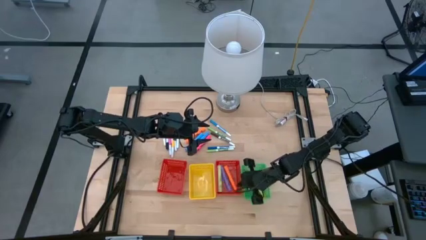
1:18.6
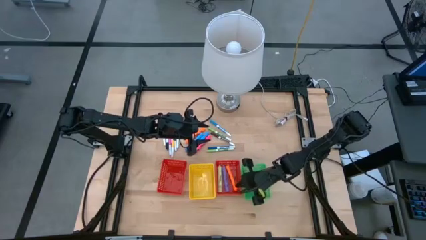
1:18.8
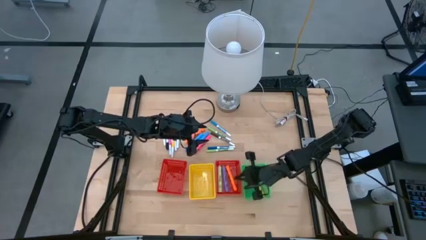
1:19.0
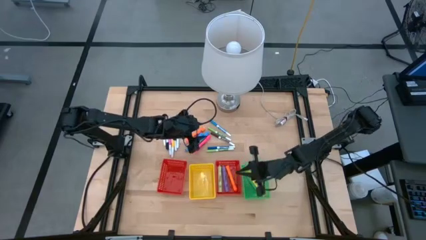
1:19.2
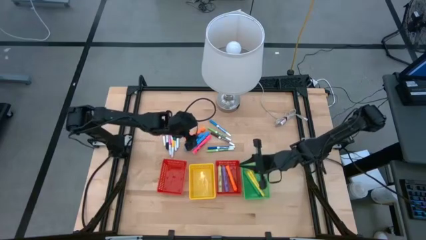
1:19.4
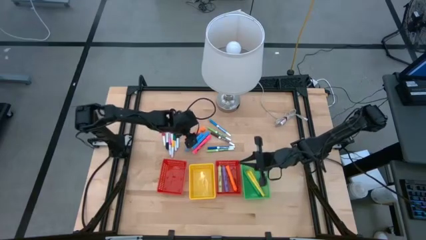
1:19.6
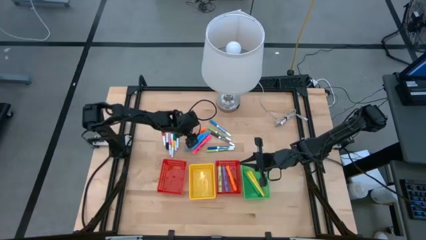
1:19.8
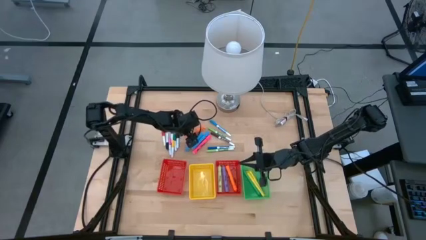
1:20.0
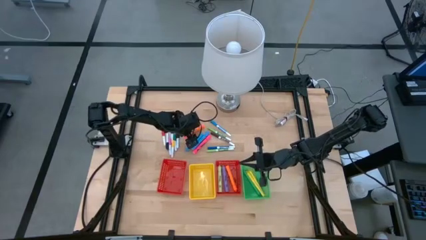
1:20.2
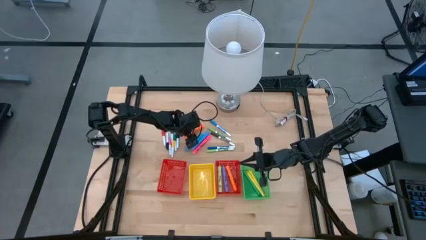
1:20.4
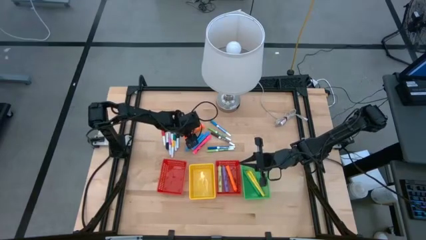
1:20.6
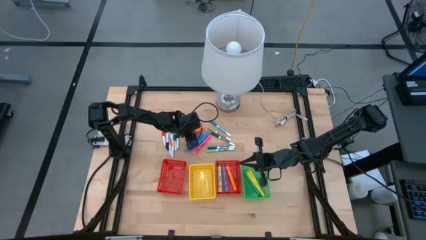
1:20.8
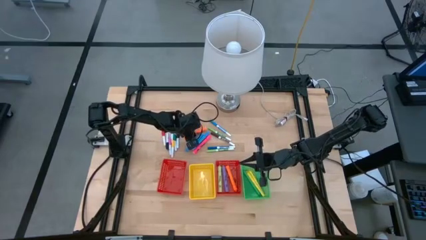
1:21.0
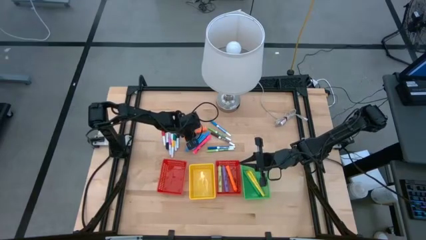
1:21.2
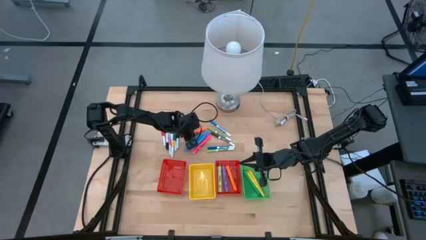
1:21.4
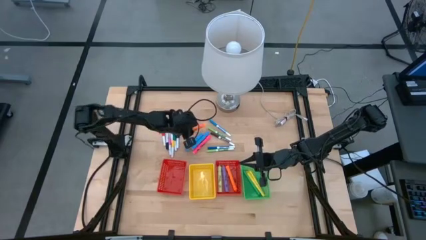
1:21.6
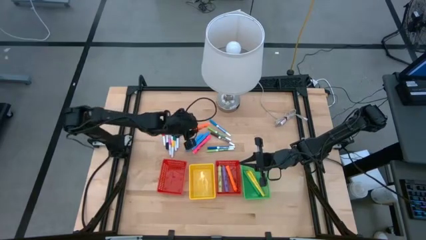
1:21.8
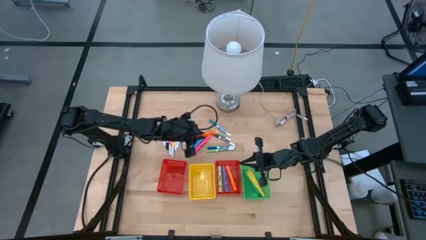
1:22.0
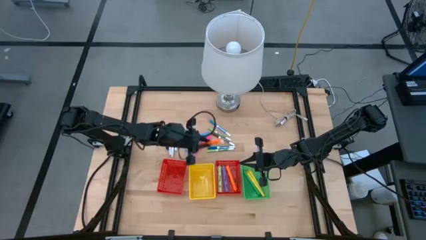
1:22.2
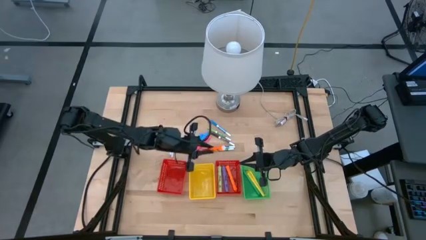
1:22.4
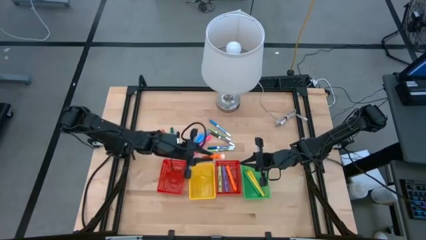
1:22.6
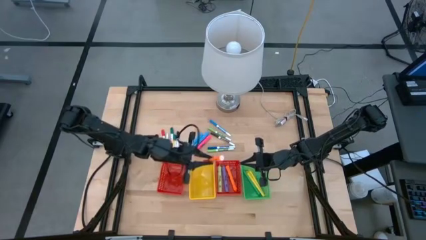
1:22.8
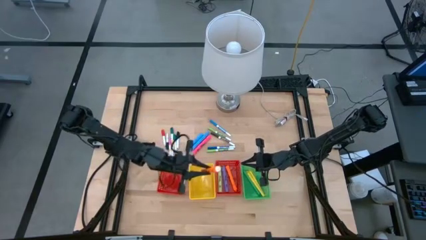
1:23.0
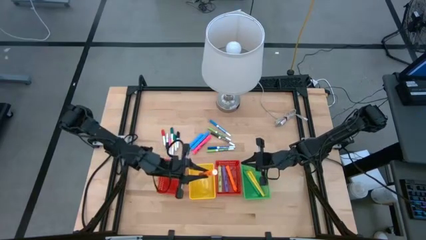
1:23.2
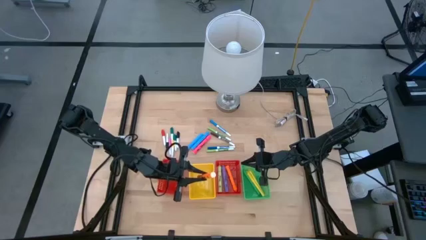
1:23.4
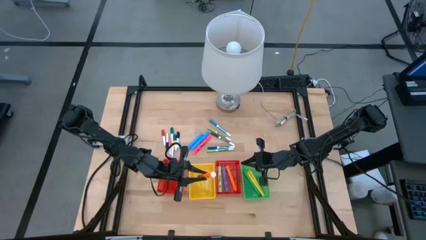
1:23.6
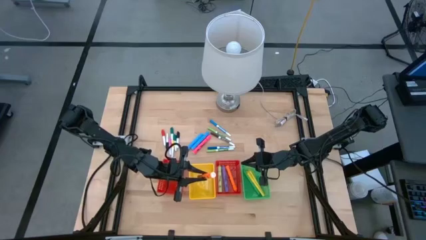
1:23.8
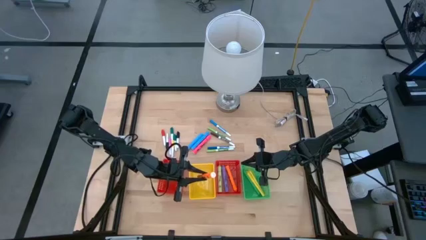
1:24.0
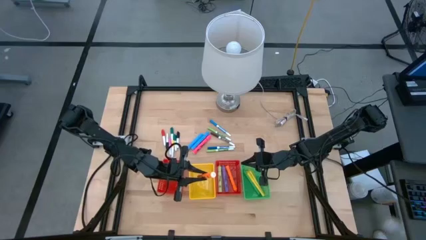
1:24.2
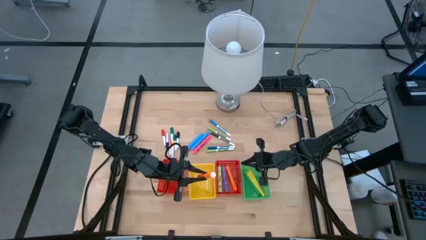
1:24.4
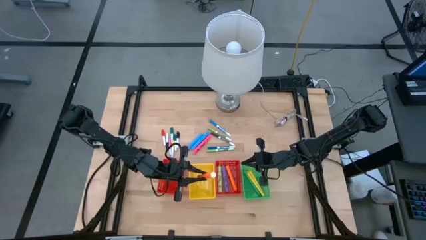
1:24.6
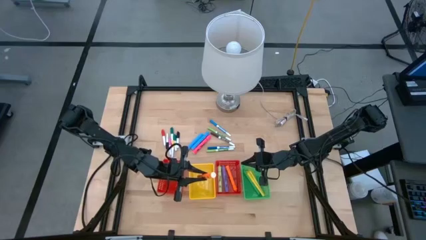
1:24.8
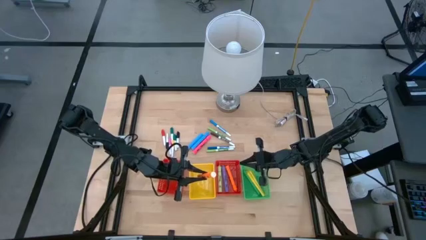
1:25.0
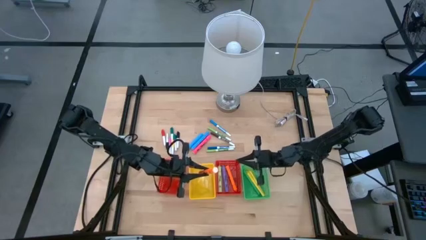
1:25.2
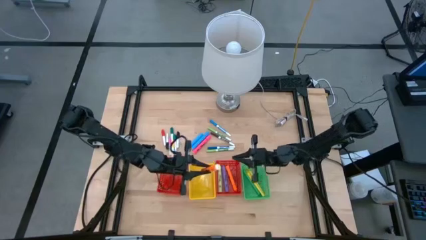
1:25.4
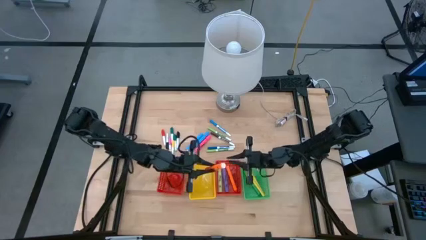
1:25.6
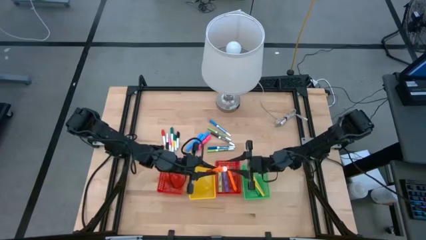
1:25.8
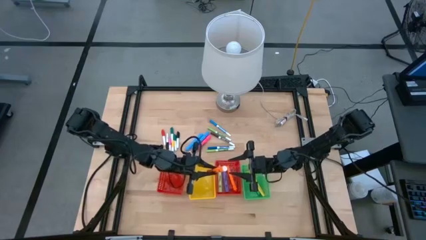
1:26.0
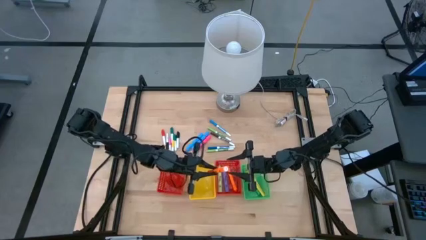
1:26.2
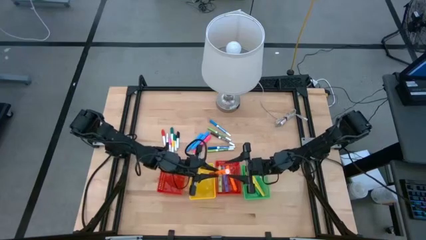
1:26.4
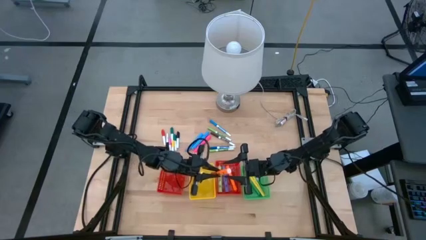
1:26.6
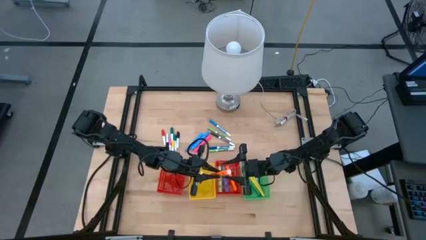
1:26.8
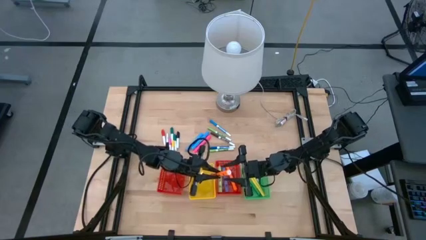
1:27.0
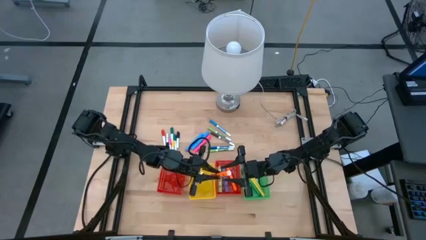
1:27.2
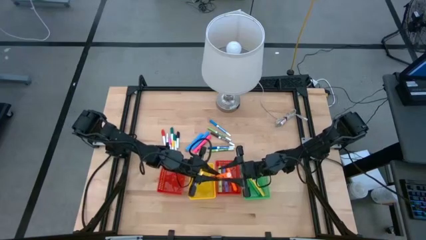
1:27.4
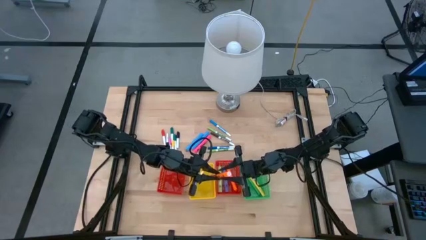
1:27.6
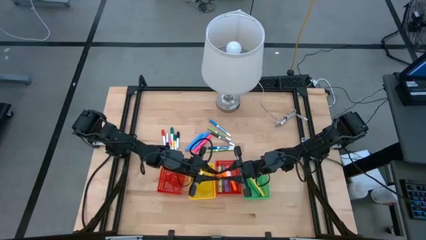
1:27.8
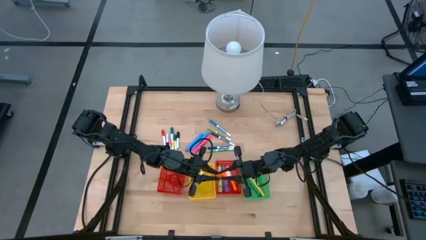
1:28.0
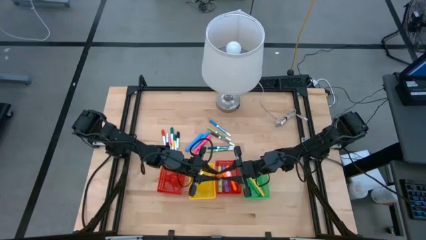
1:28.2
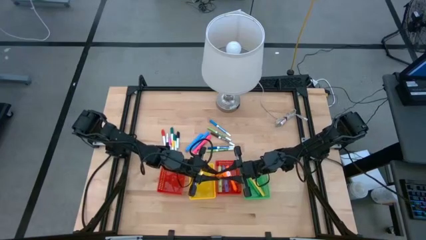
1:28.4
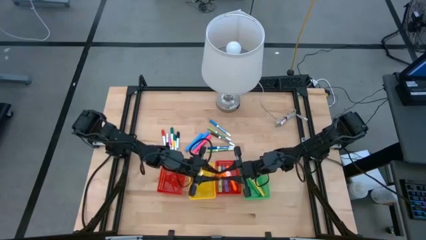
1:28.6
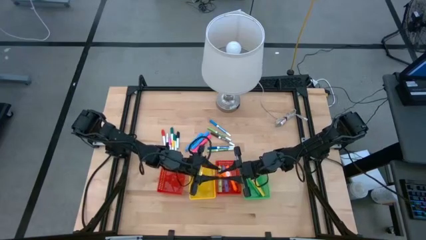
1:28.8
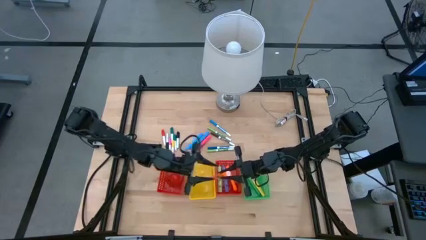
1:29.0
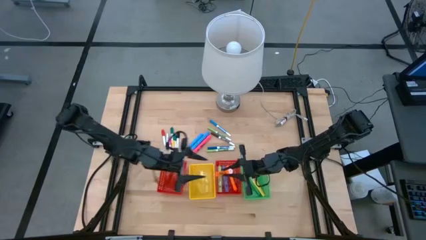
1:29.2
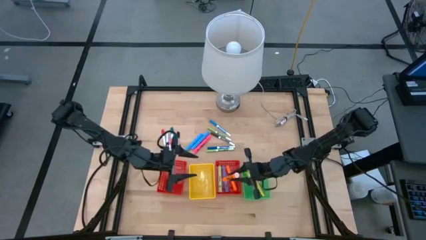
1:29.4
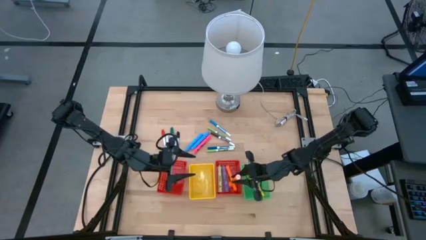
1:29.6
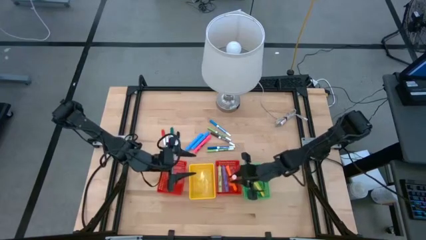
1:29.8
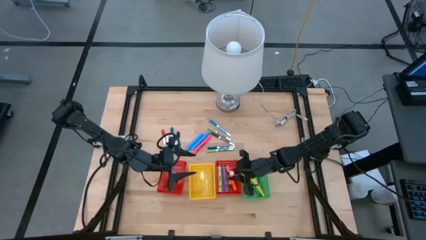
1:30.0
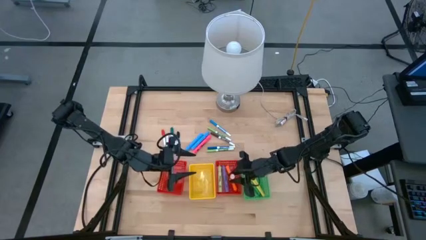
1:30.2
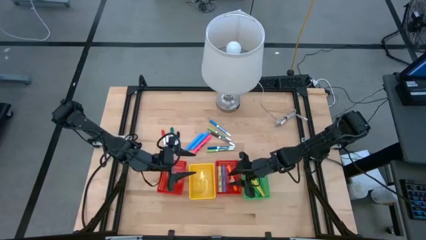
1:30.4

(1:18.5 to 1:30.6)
Task: Pick & Place Markers
Put the large orange highlighter into the right red bin
